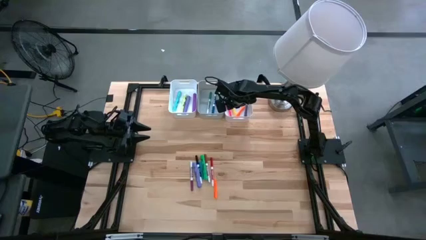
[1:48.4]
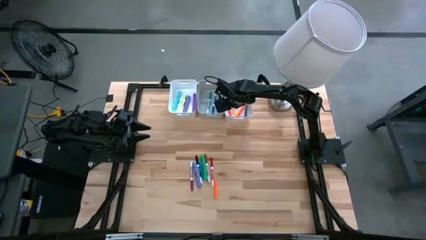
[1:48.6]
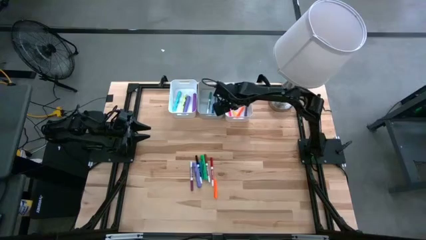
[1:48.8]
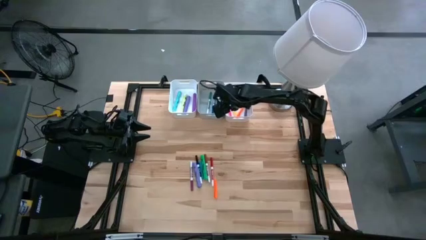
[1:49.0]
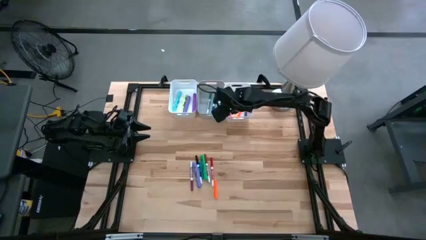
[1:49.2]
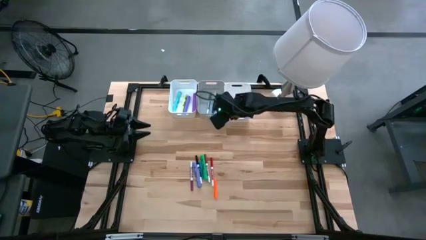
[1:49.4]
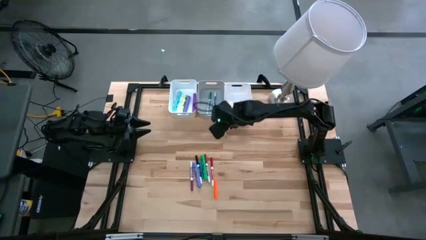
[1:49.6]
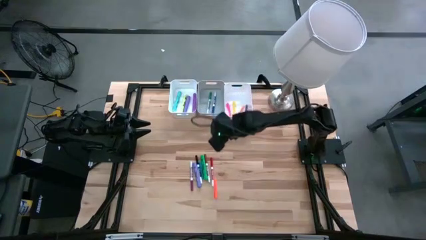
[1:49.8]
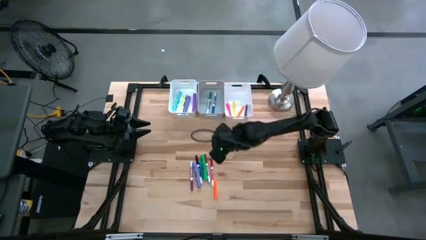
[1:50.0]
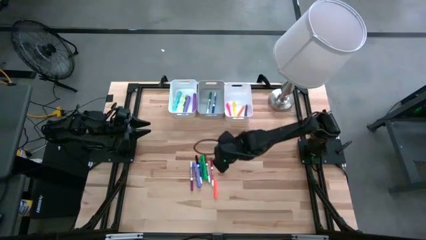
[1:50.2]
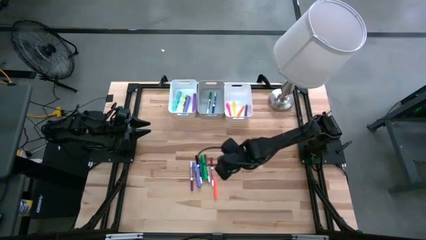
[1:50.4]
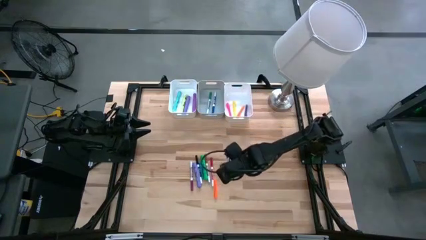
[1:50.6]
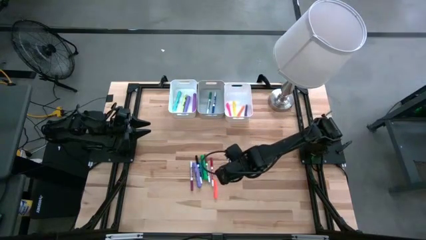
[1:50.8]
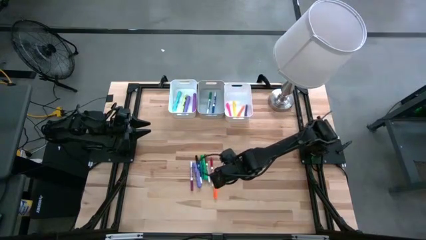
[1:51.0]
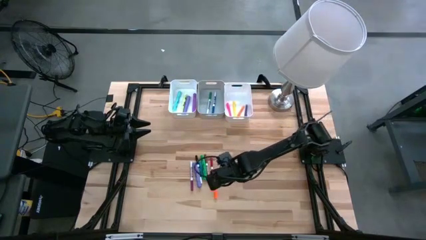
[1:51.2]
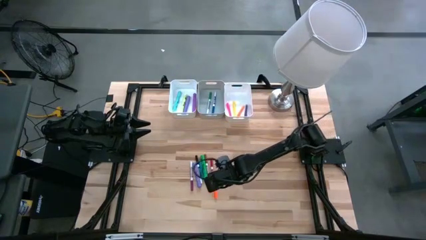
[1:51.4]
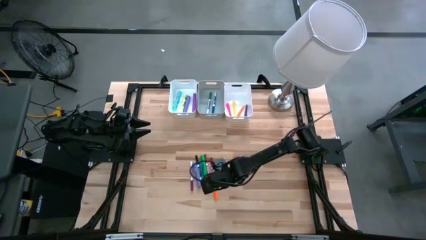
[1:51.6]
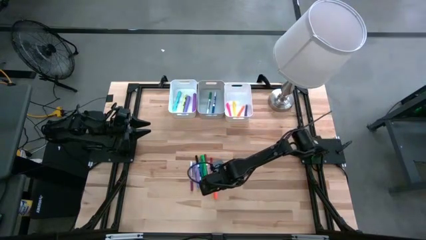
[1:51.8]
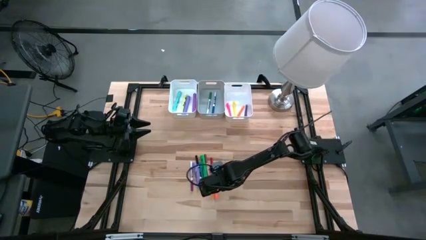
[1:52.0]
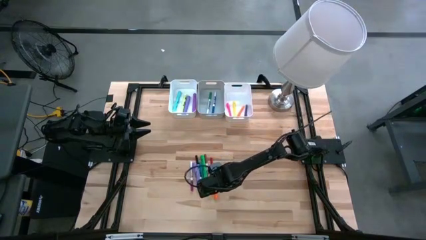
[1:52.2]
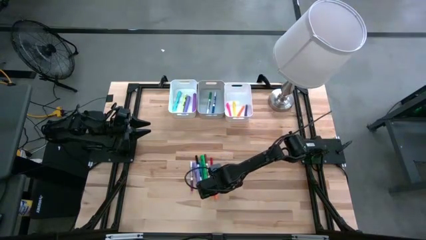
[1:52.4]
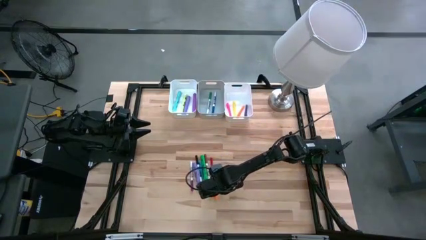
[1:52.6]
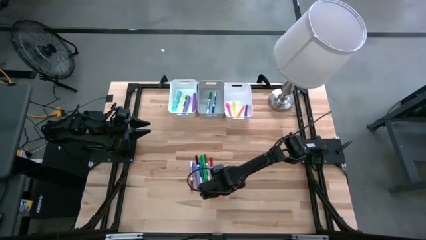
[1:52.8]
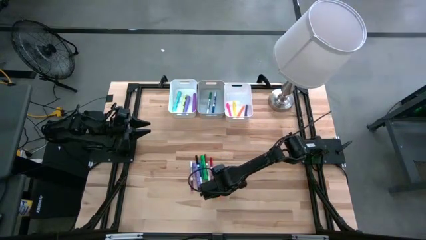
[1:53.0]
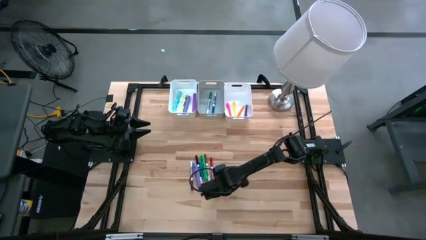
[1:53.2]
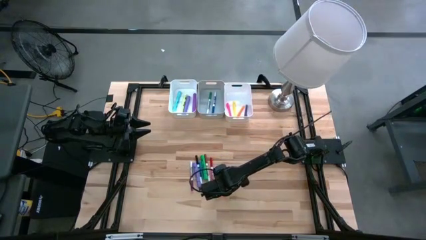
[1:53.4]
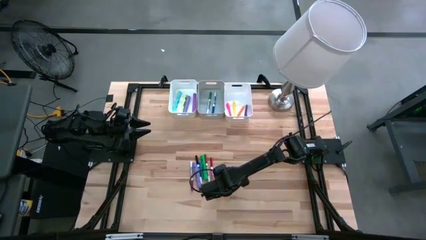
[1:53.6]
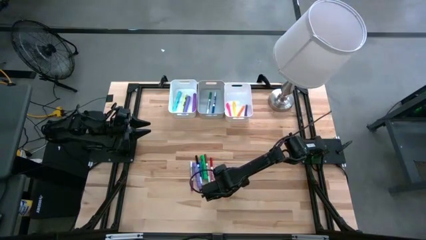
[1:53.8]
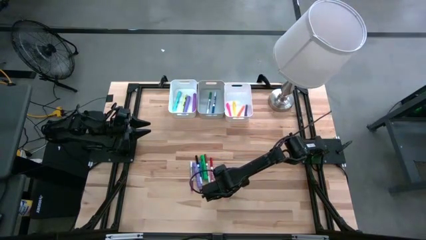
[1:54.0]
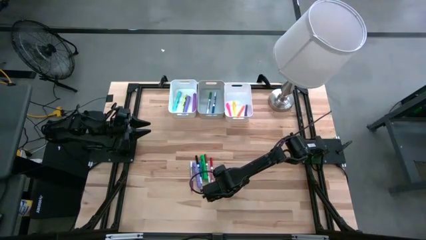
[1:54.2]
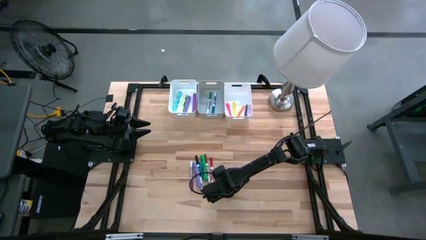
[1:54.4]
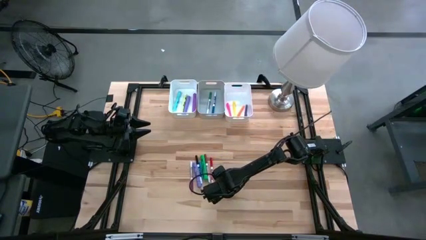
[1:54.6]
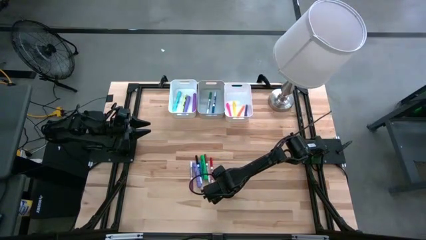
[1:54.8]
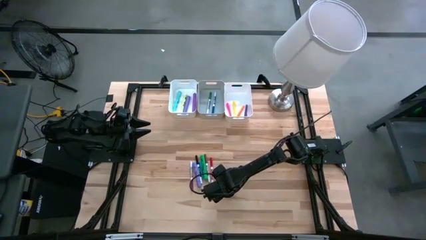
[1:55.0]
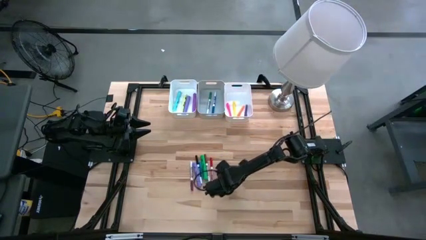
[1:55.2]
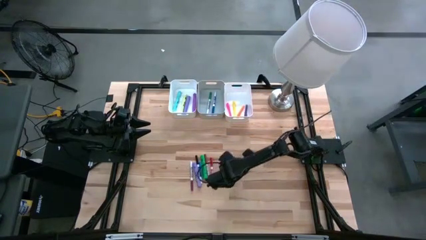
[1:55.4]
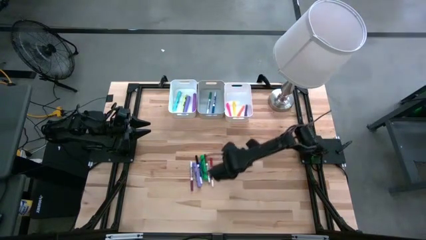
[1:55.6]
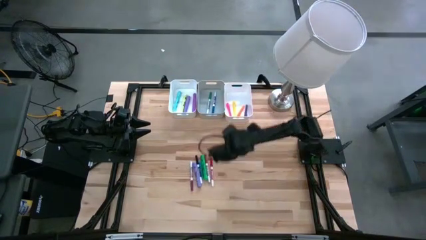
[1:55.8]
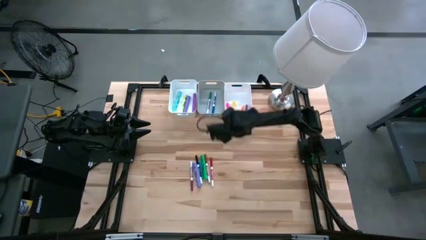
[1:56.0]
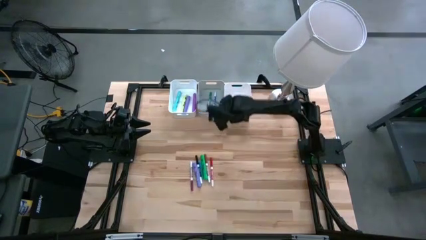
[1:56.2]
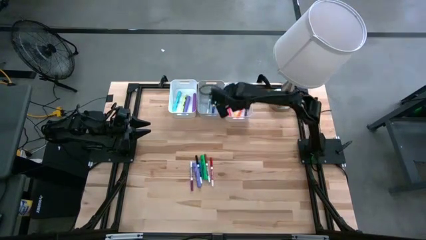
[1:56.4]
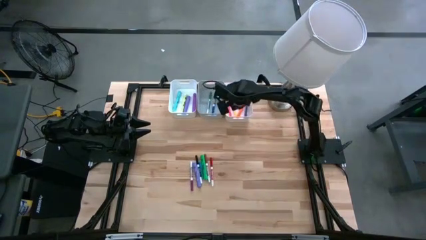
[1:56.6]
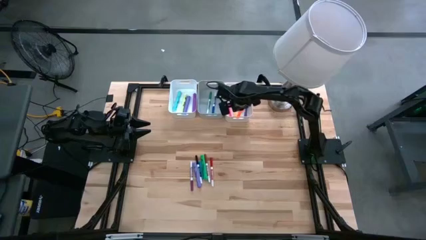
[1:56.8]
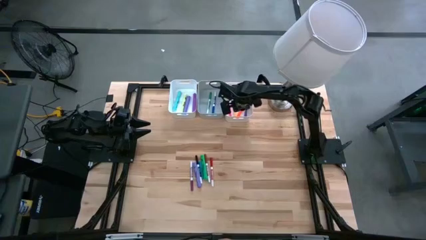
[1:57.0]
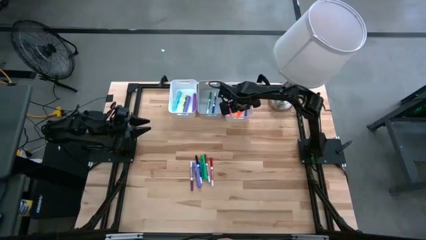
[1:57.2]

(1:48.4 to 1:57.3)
Task: Pick & Place Markers
Put the orange pen into the right white bin

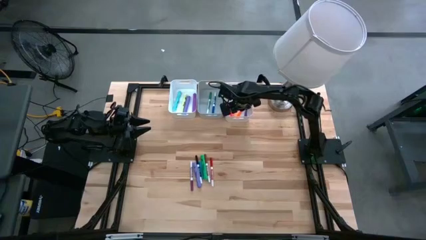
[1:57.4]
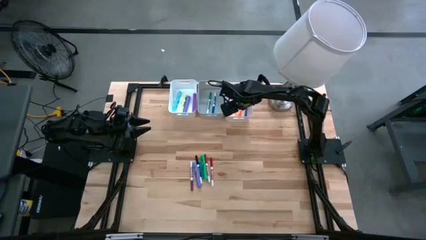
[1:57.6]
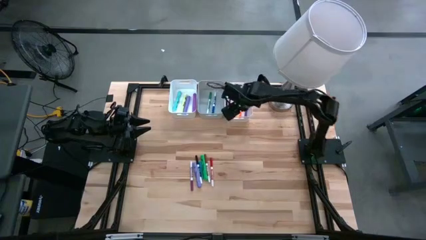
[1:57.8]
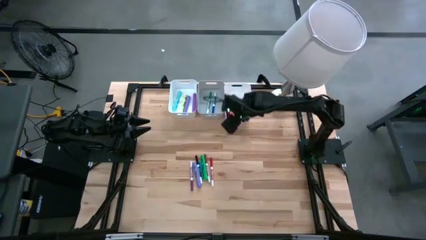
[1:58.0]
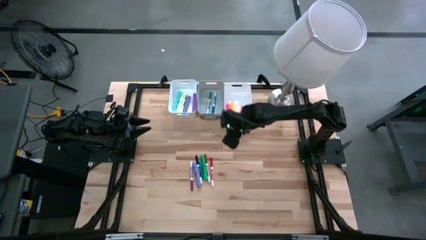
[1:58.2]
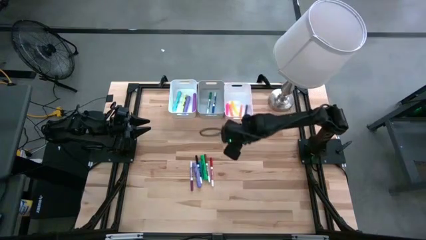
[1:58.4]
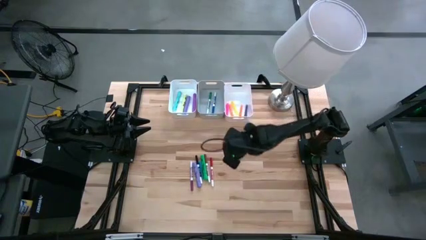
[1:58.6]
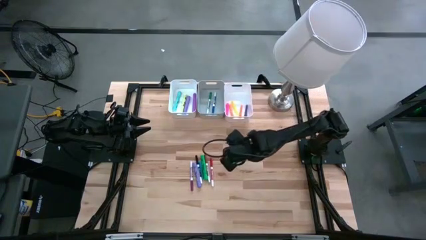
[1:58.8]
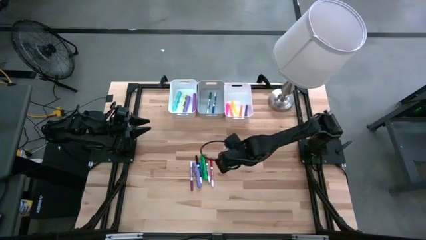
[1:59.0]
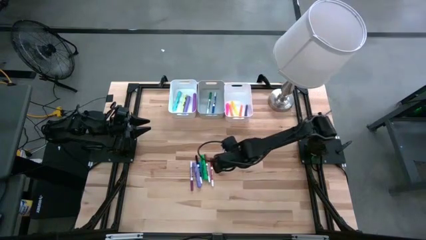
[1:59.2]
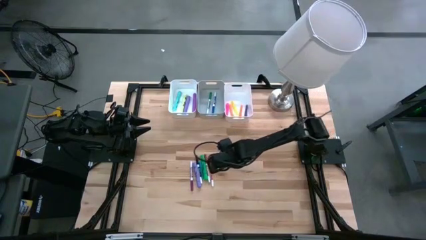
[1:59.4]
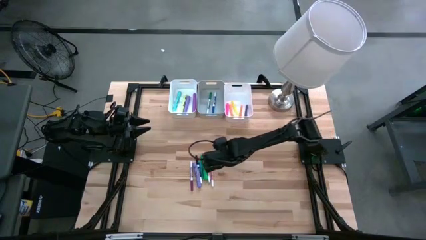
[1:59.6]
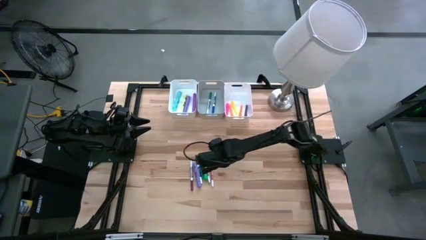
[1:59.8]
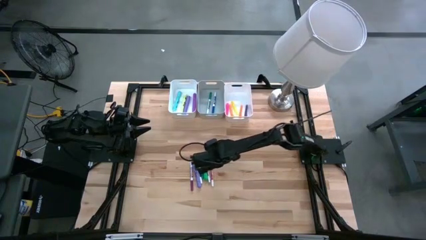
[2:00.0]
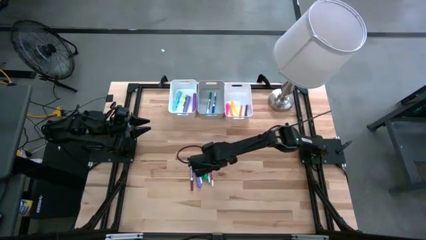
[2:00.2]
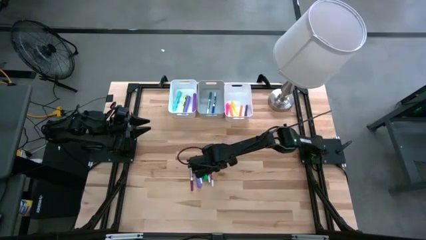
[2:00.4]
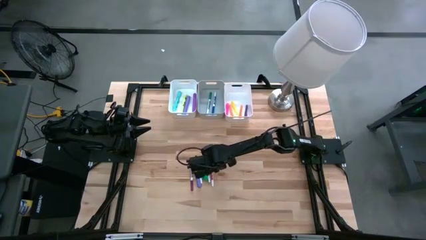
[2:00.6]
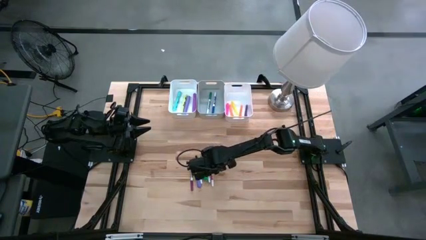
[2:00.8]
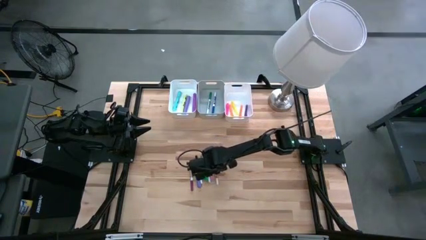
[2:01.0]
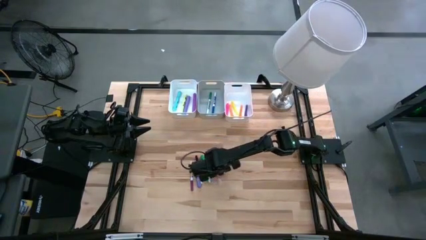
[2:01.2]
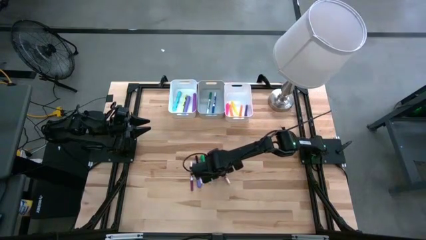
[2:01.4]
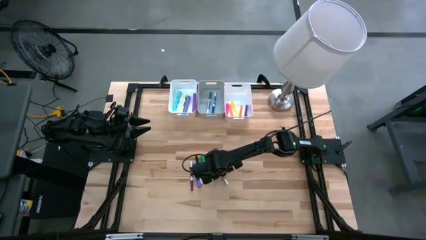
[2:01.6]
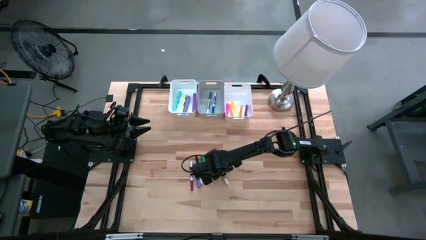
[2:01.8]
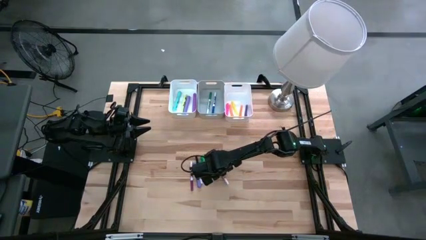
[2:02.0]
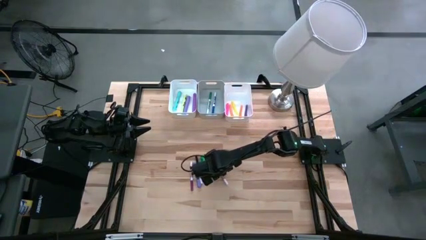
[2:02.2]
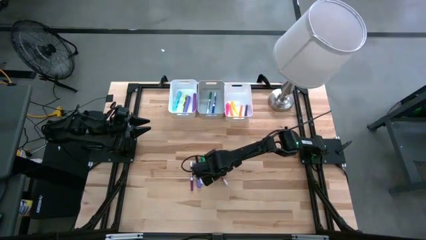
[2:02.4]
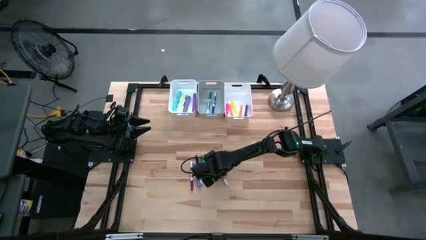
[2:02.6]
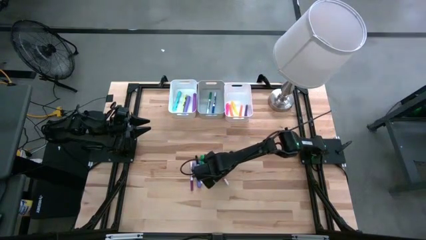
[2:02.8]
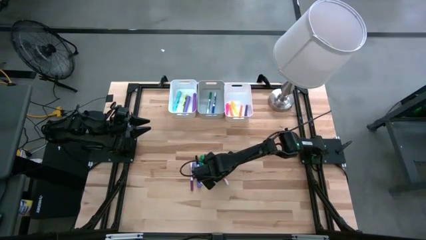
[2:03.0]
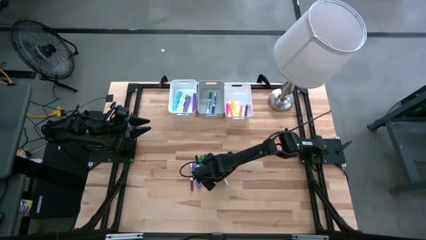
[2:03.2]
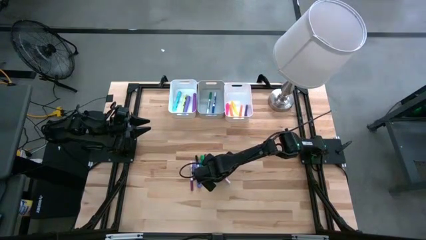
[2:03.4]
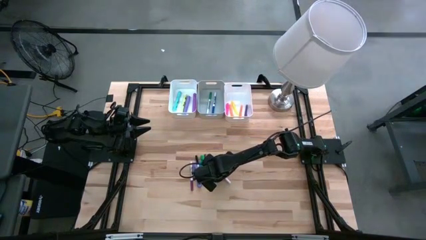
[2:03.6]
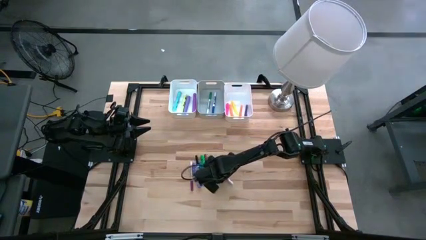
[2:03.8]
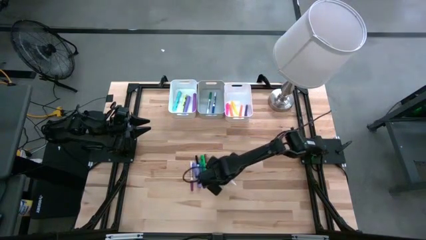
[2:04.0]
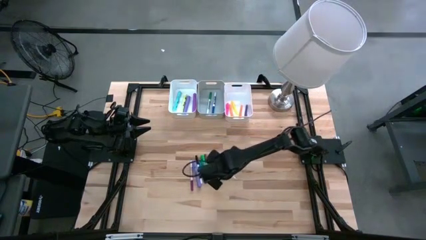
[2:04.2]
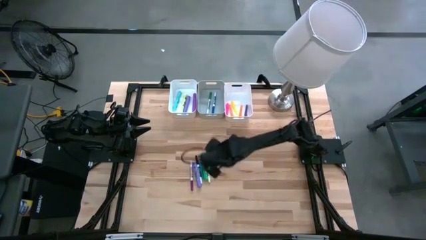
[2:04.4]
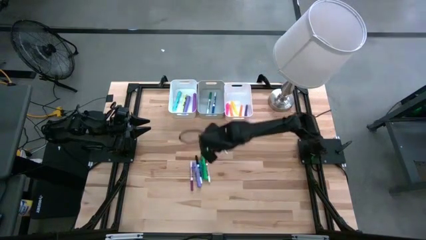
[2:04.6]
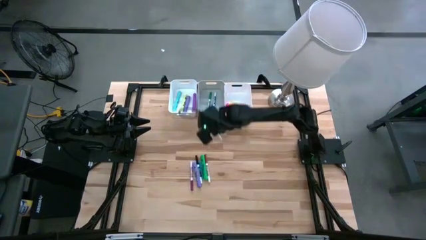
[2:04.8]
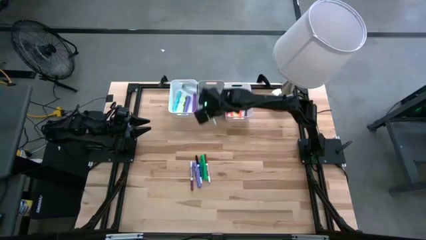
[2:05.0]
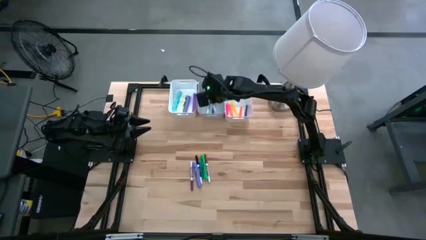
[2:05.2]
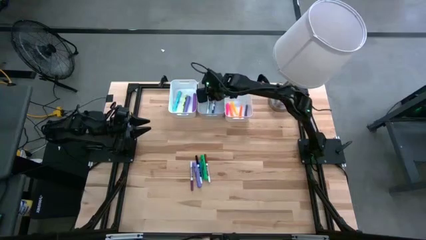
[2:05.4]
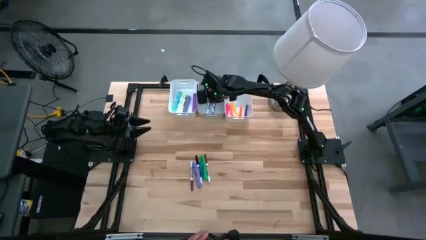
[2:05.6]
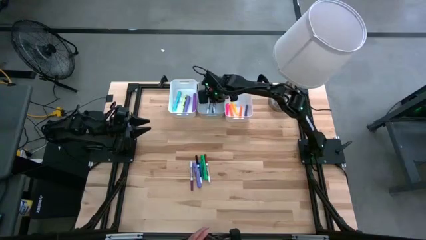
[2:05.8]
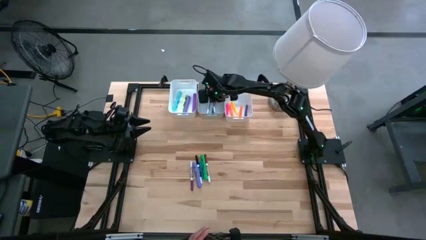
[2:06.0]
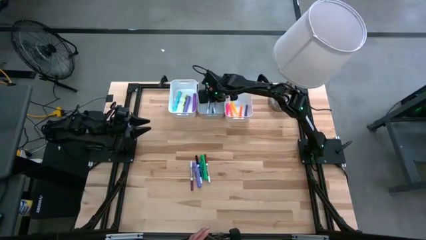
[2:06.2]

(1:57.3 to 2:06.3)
Put the red marker pen into the gray bin
